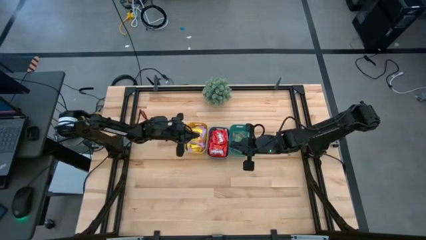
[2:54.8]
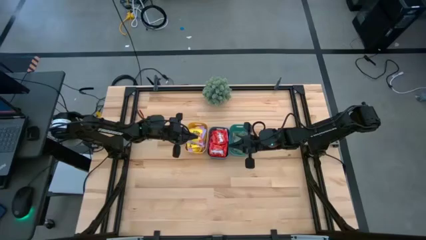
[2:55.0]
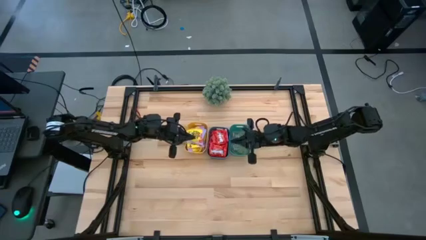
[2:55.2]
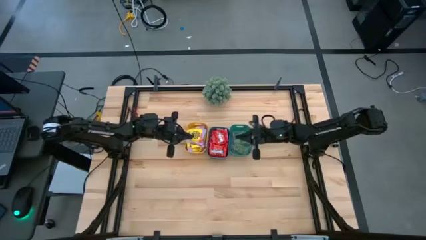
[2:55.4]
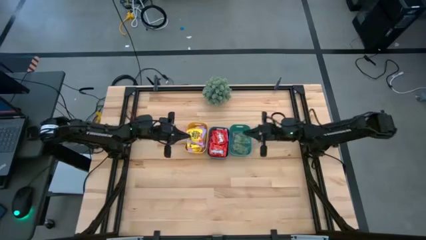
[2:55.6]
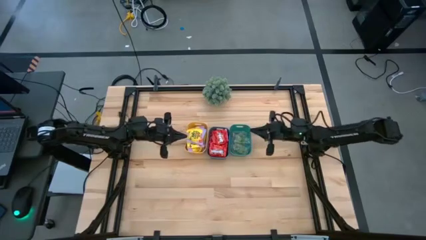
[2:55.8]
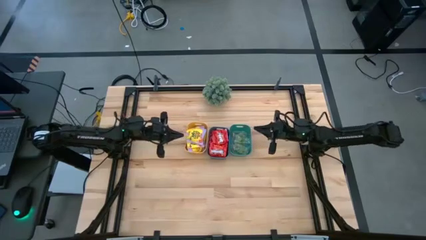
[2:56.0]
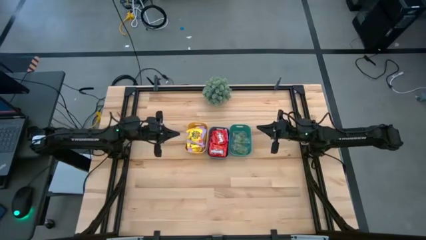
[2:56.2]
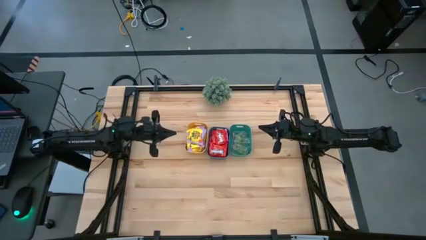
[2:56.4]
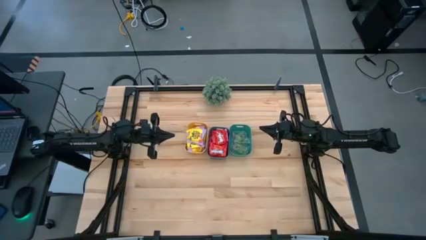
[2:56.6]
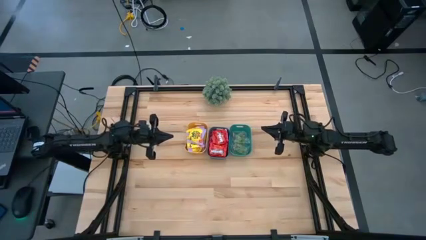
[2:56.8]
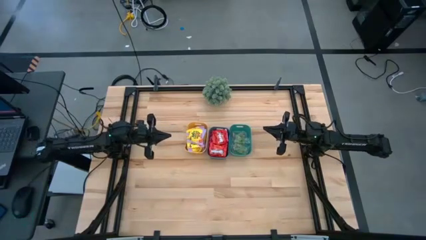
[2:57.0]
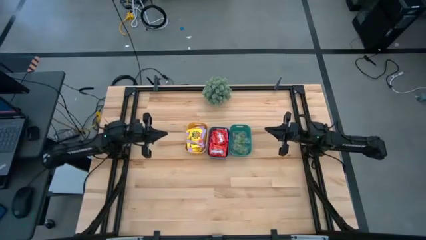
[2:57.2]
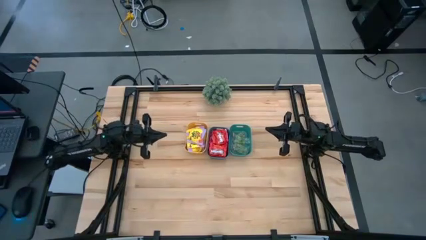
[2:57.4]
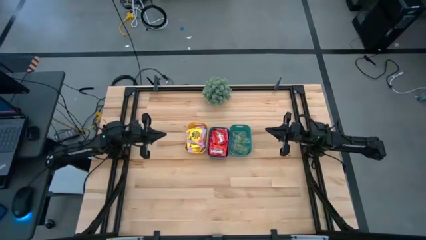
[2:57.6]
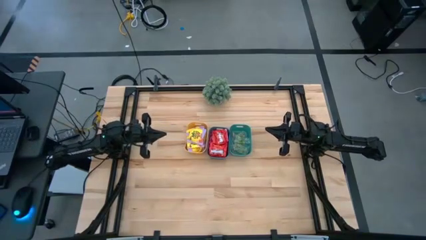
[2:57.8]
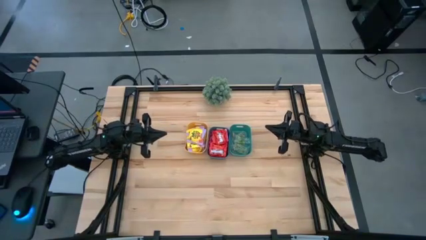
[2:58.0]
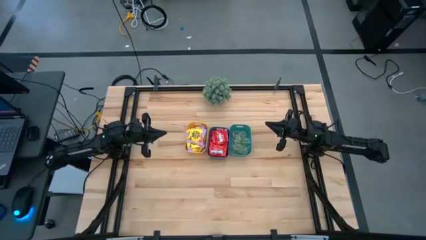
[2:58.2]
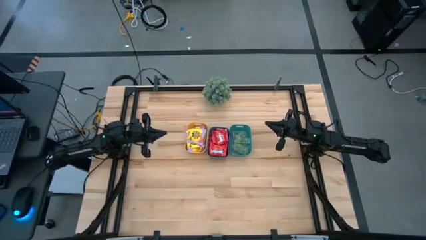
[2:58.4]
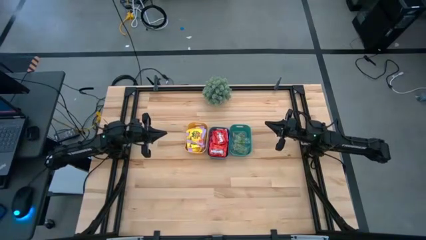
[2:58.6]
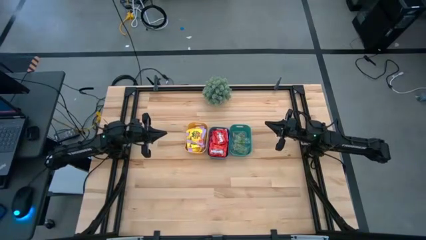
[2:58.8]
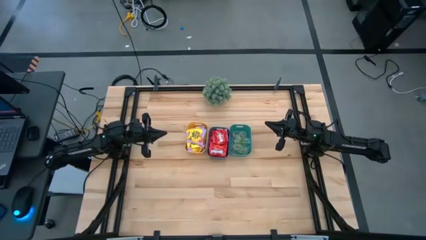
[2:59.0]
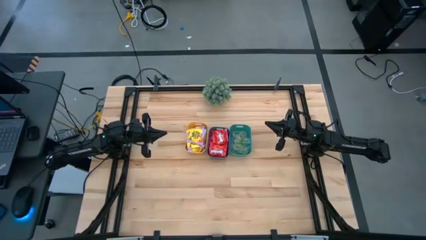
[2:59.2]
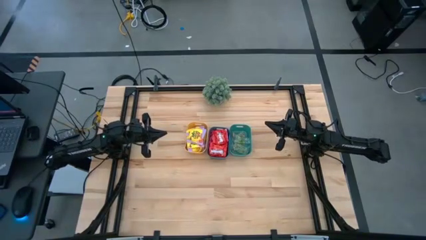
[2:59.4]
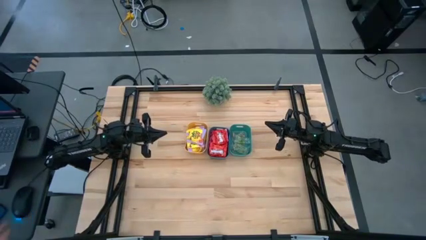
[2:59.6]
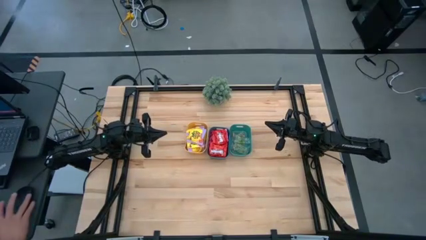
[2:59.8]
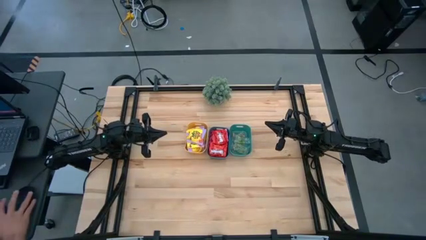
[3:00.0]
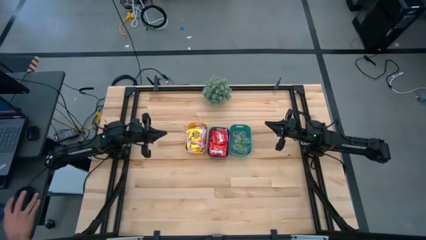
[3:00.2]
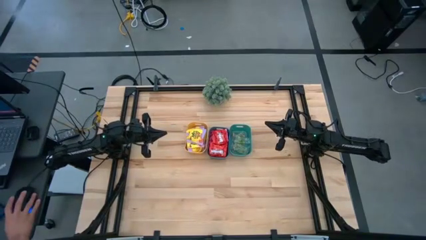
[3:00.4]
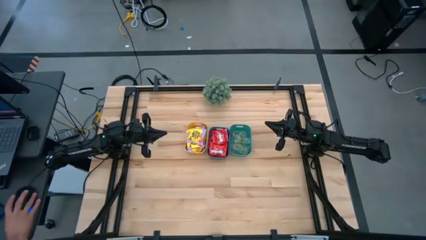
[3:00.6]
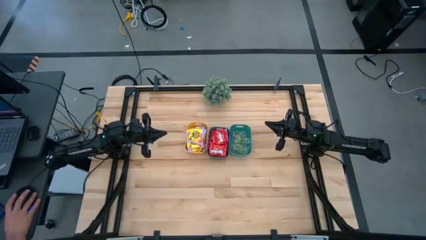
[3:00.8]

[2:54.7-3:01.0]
Task: Sort candy
Return to Home Position

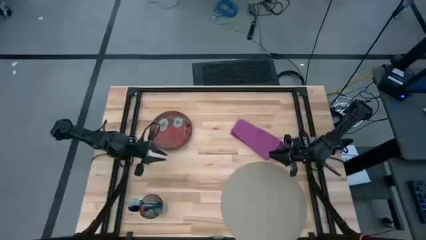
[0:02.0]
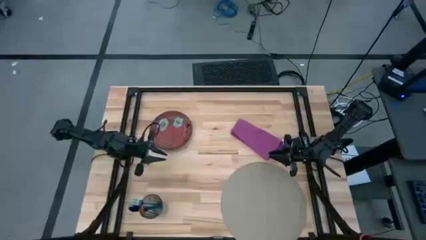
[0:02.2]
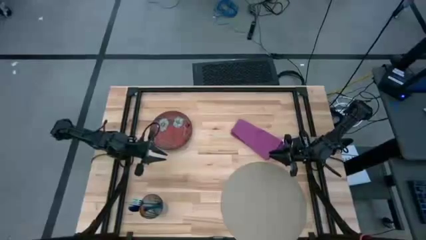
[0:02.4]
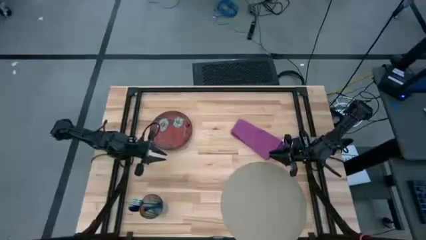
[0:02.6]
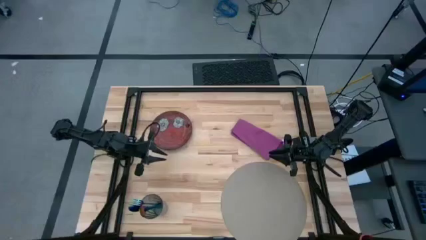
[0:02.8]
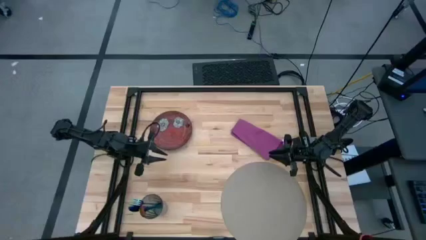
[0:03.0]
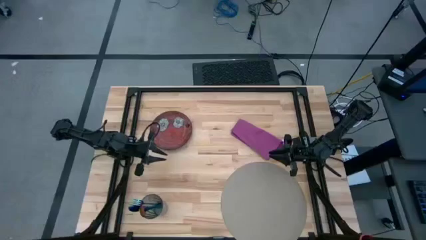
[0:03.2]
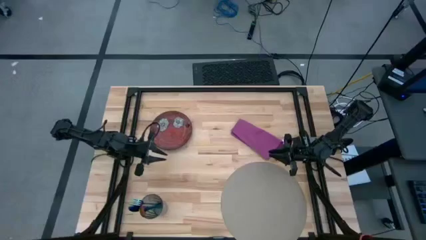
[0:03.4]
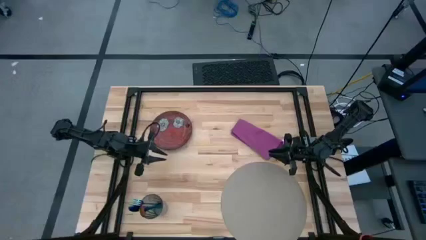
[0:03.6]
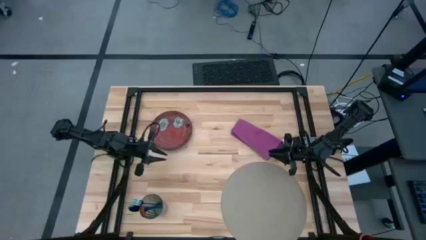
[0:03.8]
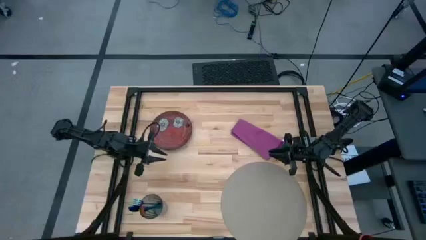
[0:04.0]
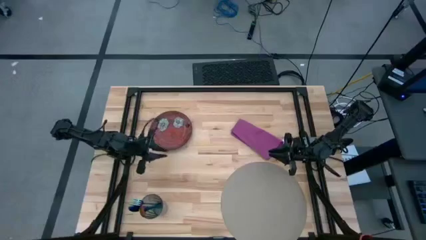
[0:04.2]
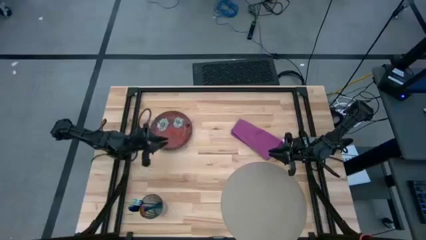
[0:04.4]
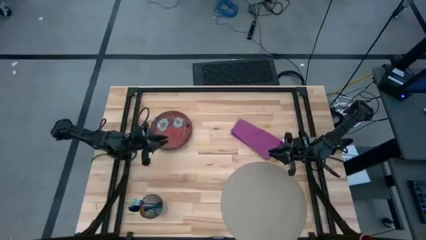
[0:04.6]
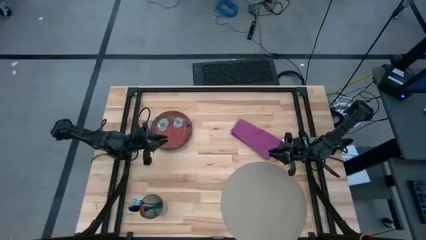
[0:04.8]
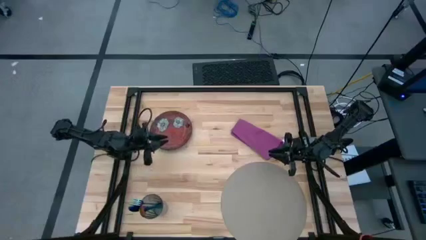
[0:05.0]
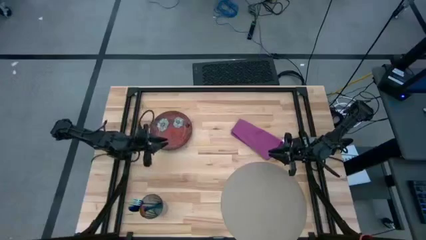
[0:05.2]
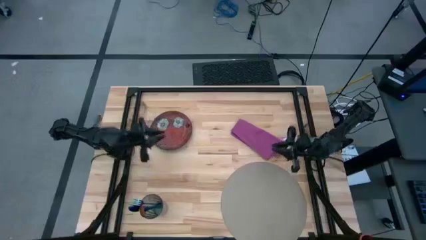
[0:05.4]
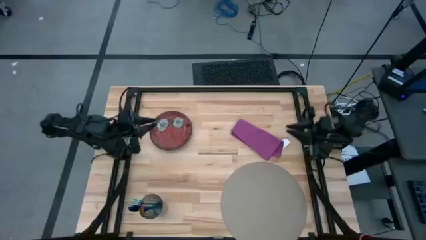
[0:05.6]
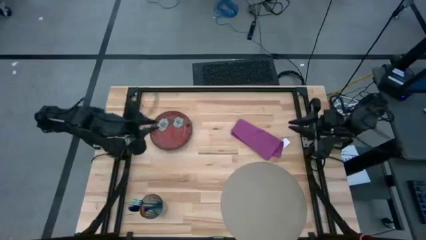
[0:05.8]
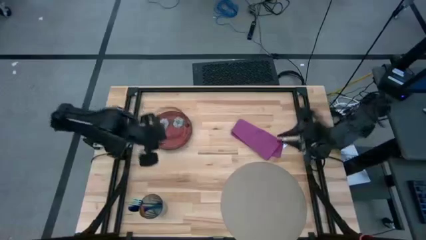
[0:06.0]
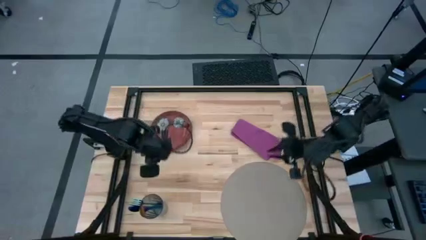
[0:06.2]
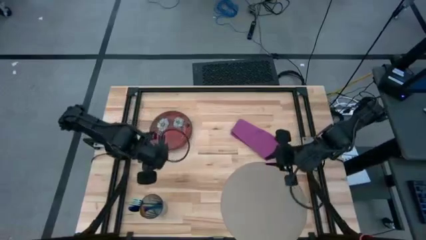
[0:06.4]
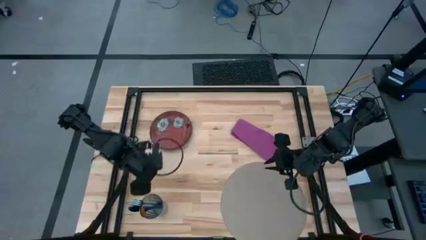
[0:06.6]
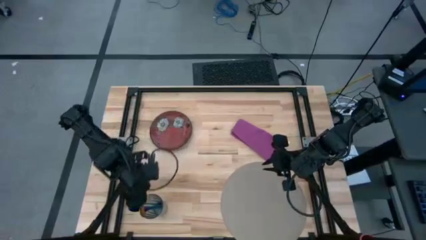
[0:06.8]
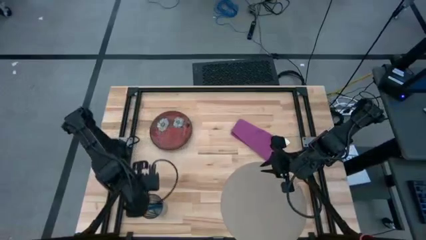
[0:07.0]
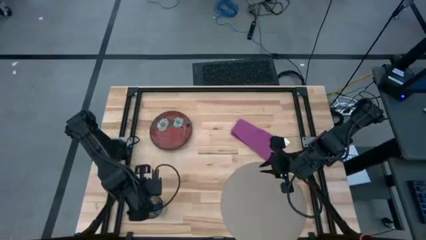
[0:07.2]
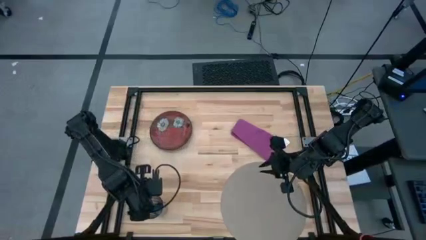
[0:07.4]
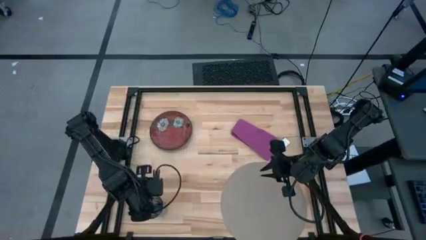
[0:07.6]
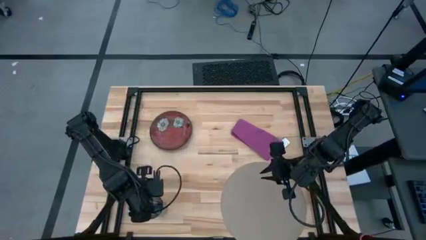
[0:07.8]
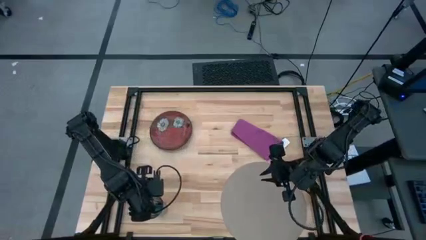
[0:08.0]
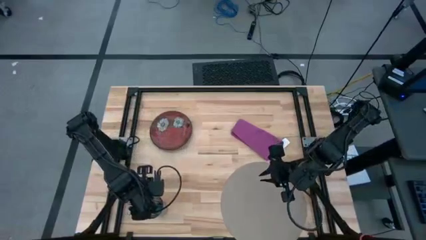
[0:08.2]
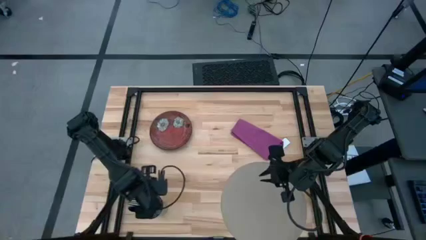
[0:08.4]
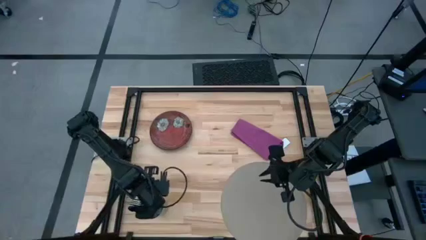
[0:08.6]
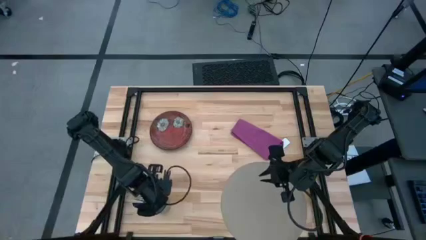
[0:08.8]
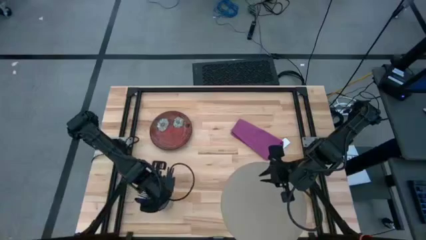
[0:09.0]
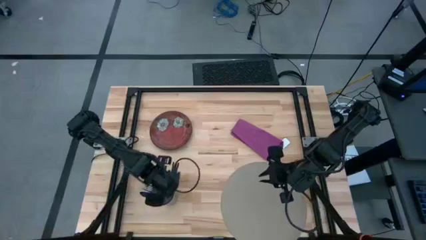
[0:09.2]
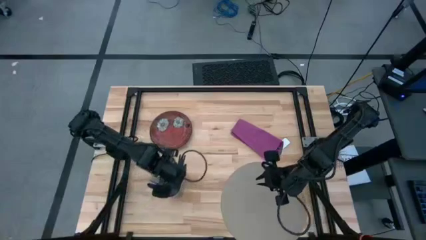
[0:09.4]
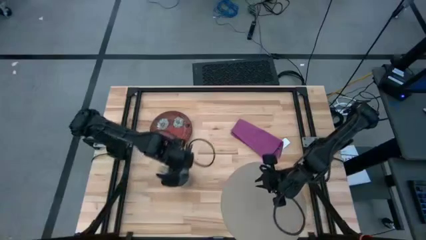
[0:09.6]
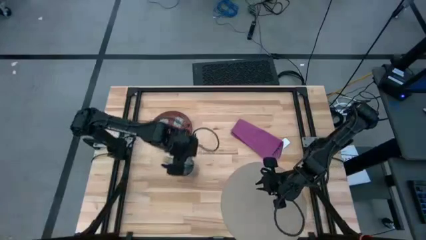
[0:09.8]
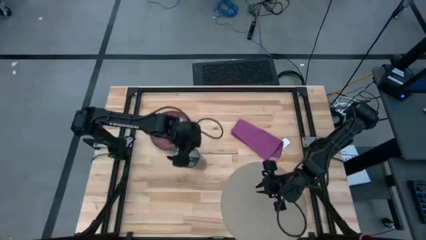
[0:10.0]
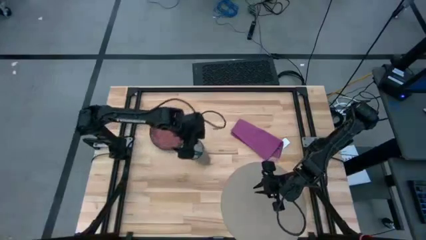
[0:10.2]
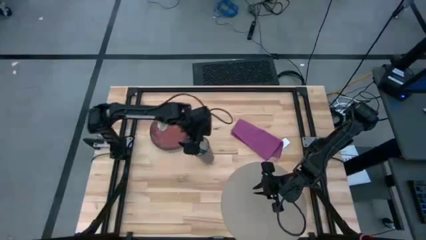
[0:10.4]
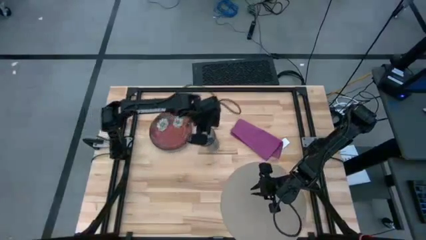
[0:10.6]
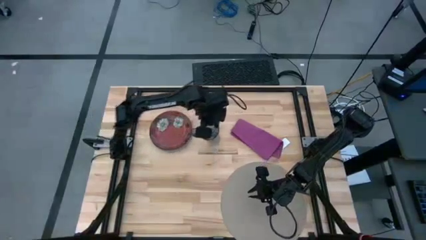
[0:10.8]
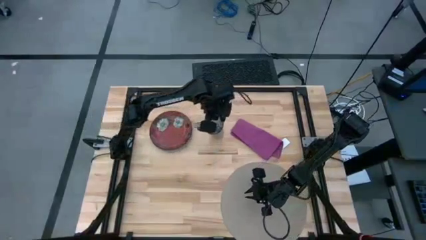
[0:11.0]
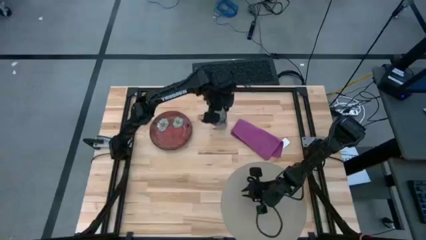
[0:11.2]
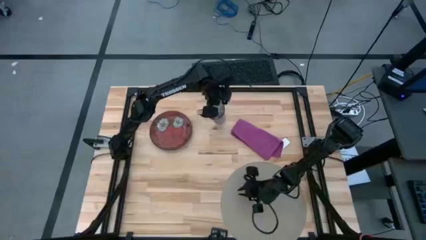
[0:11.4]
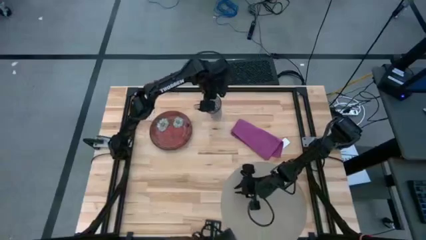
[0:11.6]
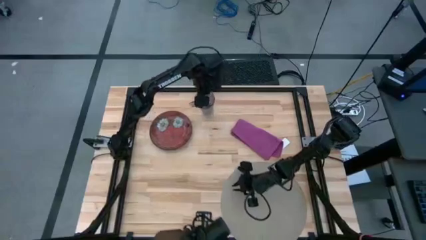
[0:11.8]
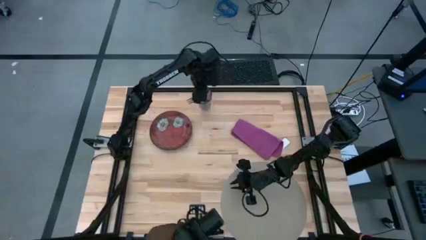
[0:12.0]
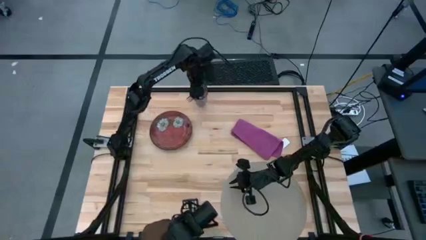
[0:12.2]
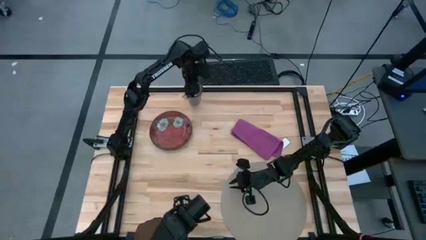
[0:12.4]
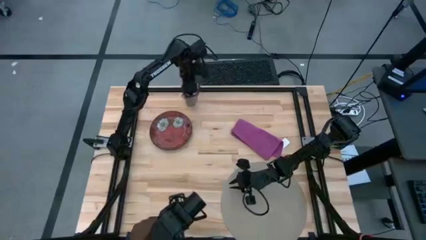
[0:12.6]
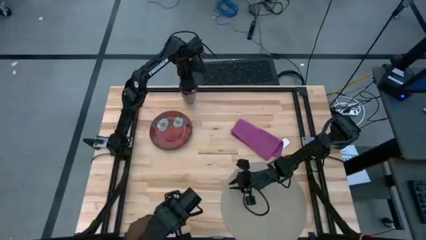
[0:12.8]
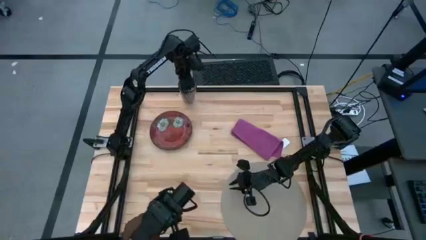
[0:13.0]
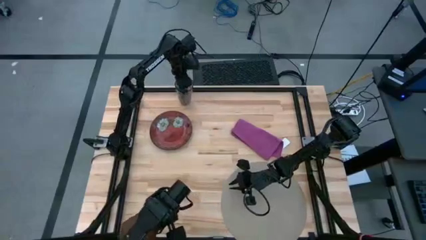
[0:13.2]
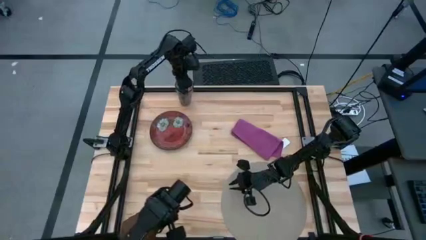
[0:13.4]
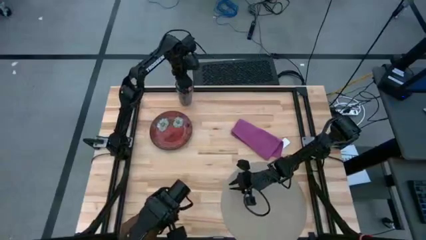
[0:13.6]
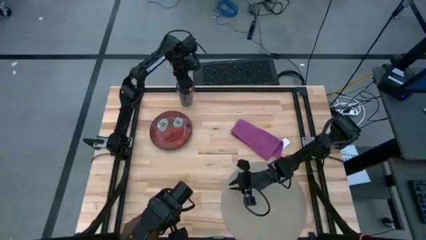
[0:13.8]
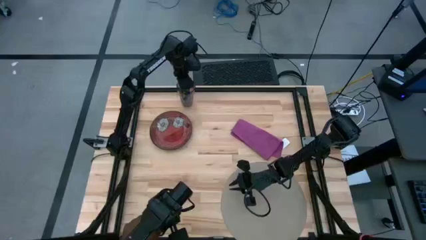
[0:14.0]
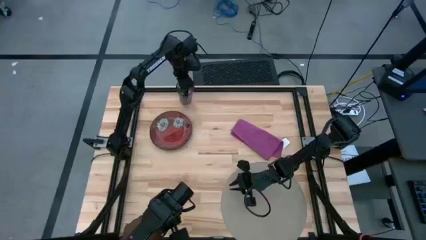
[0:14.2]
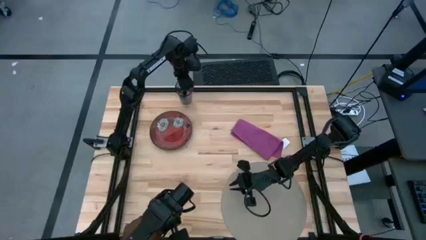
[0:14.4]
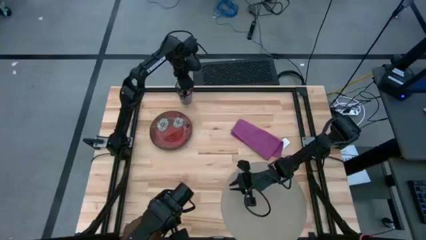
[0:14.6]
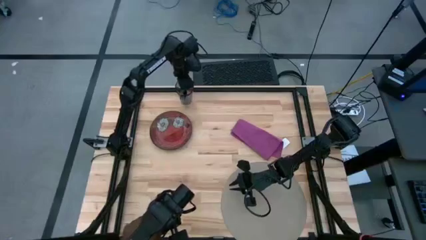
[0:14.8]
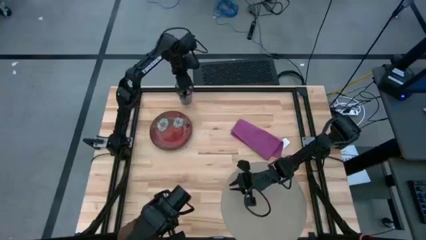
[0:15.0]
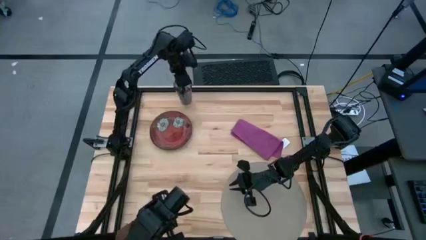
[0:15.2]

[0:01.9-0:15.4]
Task: Set table place
Move the blue cup to the top left of the table
